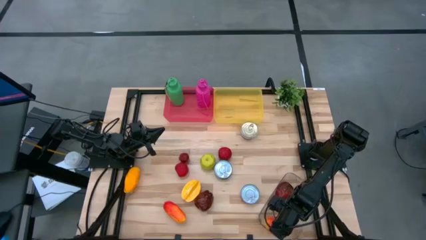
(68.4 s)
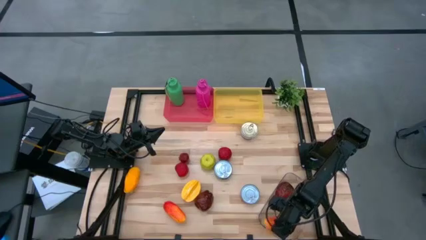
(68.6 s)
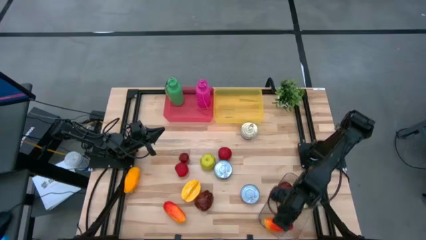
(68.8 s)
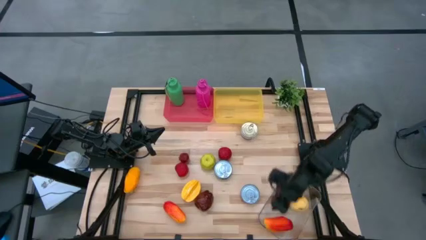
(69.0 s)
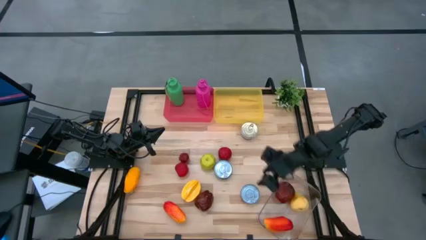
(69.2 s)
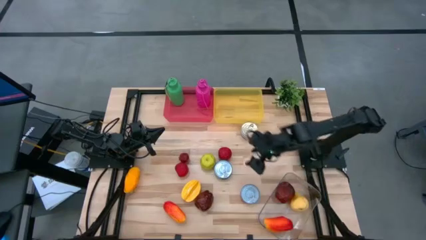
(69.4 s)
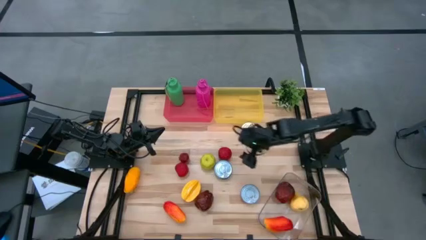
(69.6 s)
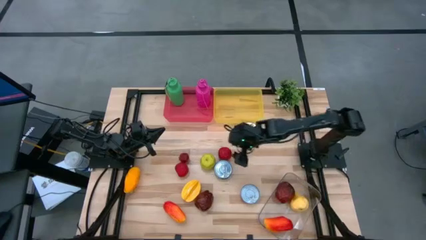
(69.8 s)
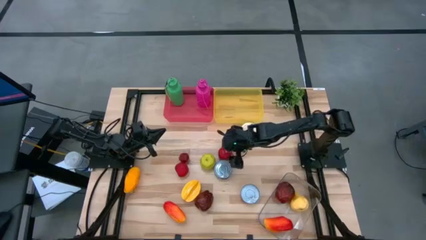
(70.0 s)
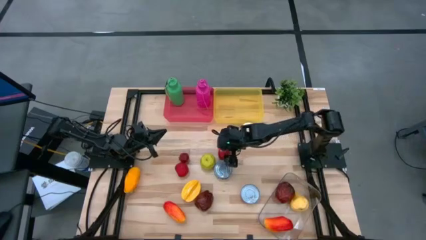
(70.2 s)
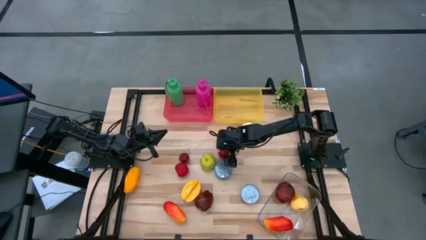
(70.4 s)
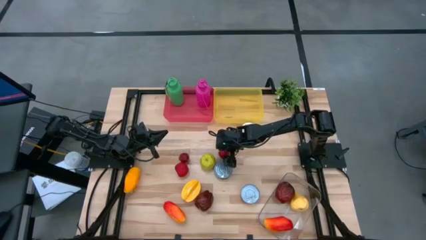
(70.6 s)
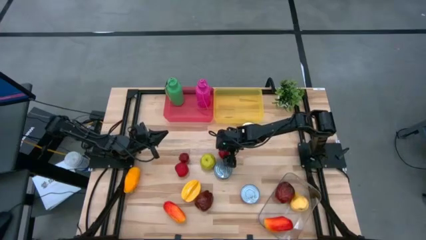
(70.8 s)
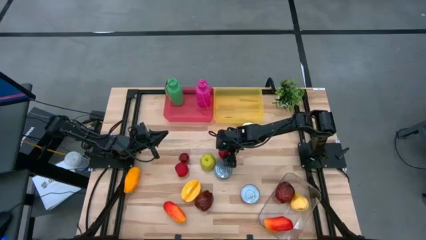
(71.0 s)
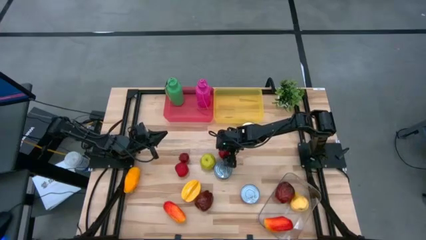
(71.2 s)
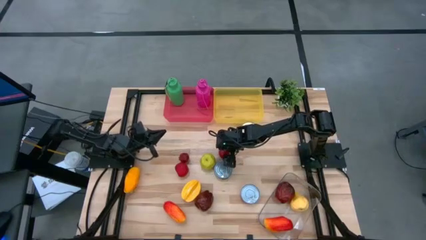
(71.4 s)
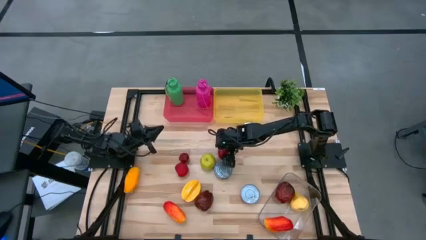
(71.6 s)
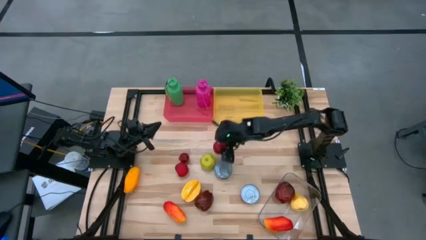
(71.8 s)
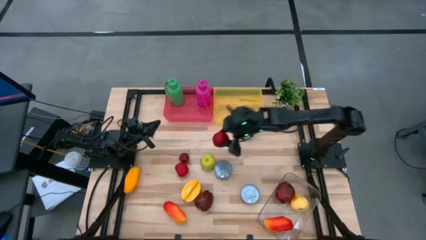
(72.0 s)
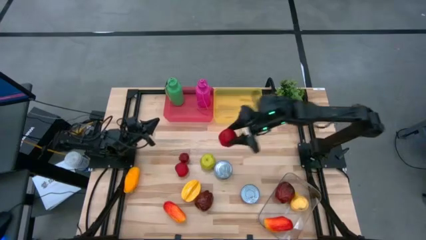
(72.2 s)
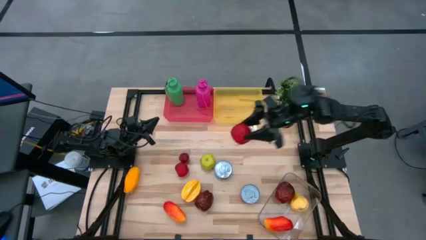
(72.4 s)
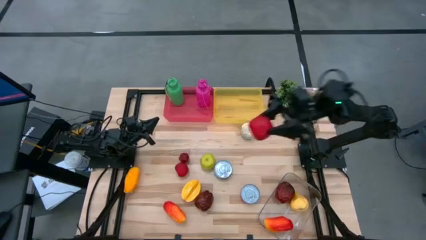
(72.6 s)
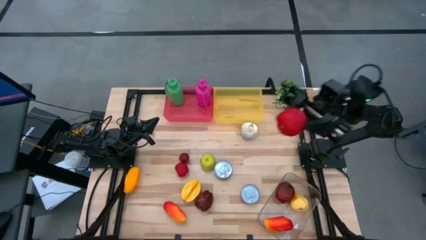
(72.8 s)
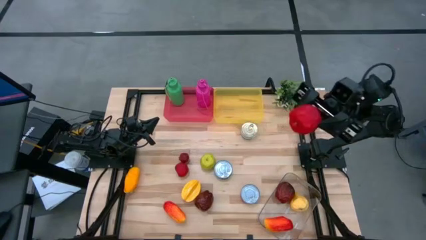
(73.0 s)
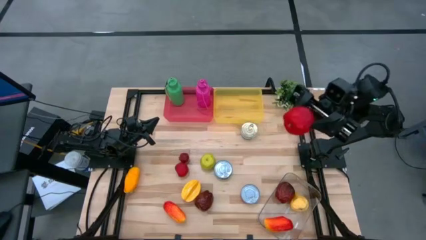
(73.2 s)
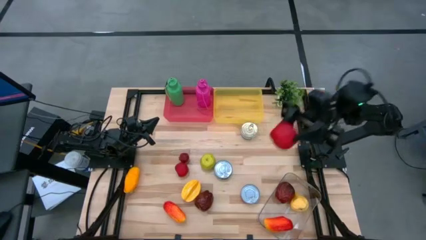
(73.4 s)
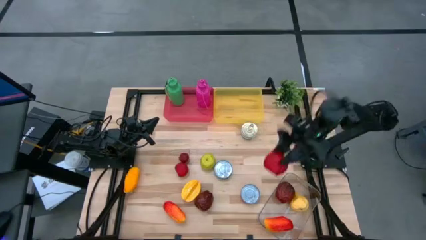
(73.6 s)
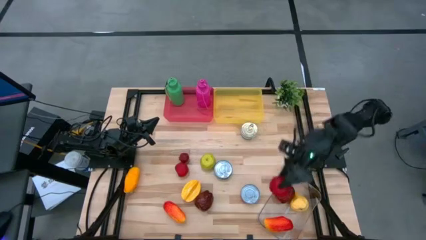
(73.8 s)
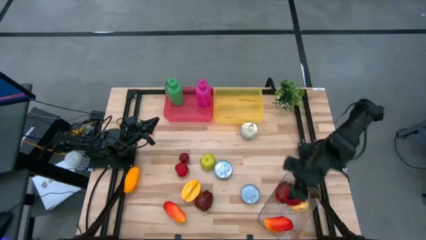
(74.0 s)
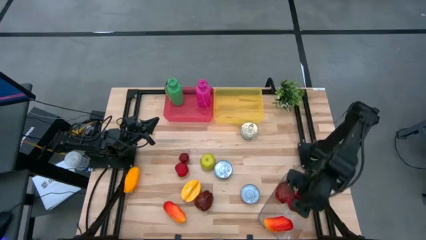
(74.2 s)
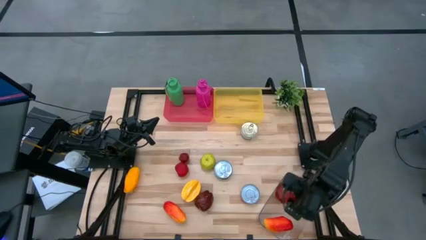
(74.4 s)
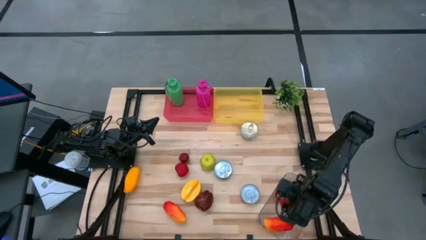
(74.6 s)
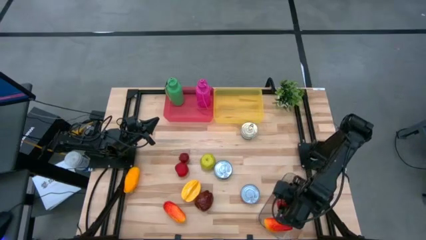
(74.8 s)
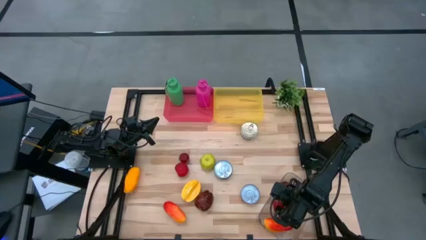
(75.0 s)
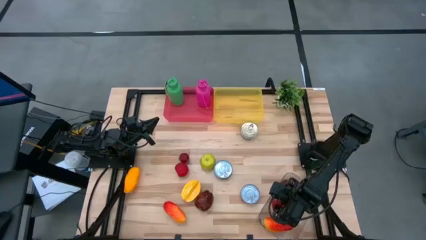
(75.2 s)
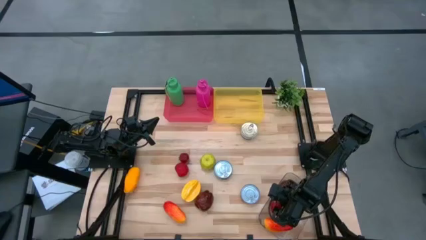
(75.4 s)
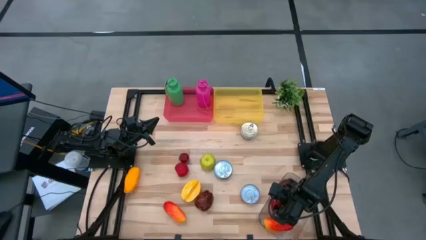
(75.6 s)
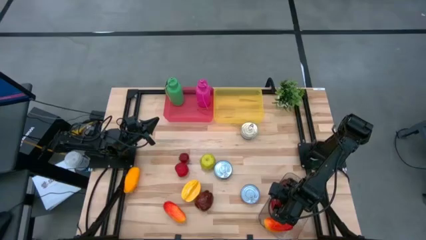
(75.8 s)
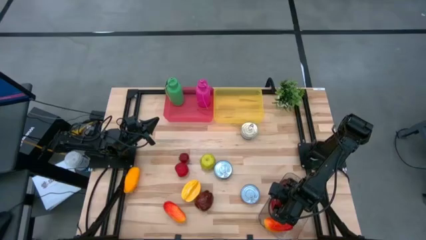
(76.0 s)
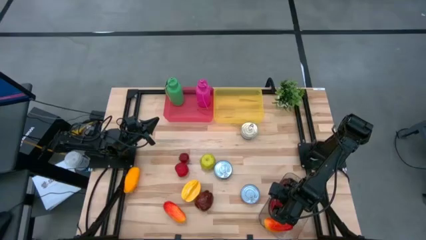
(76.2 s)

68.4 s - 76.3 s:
Task: Pick & Place Food Item
Put the top apple into the transparent bin

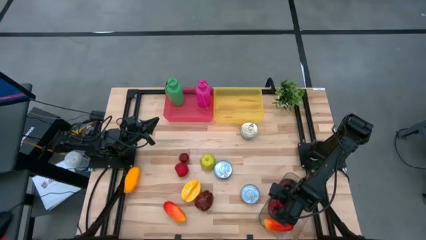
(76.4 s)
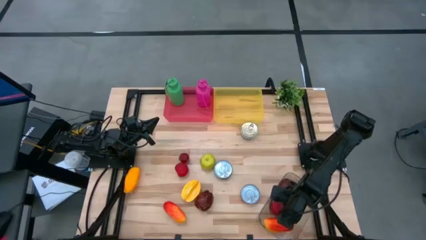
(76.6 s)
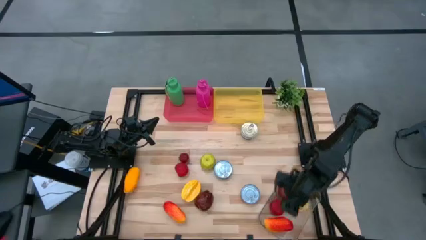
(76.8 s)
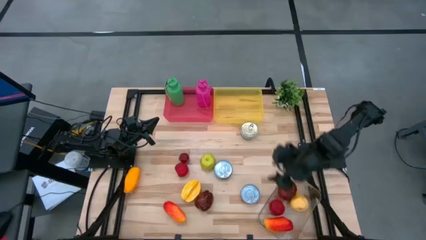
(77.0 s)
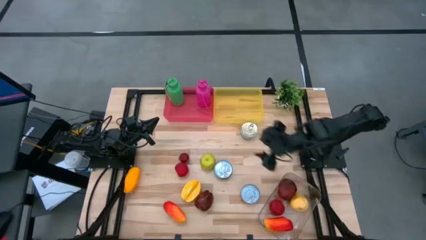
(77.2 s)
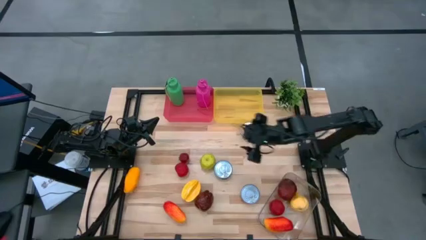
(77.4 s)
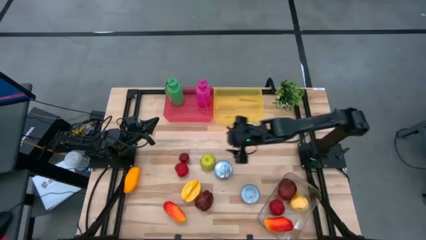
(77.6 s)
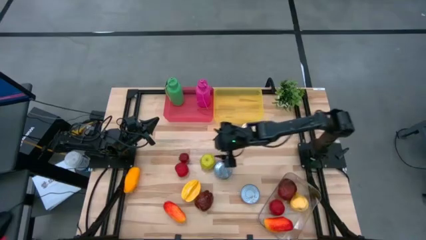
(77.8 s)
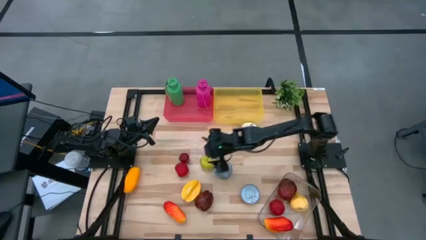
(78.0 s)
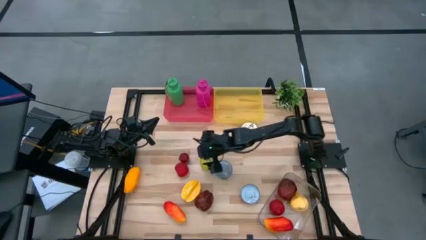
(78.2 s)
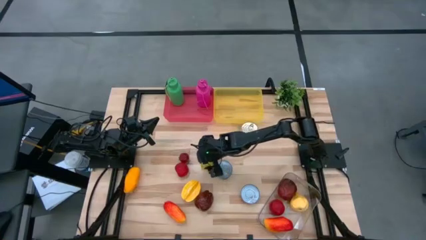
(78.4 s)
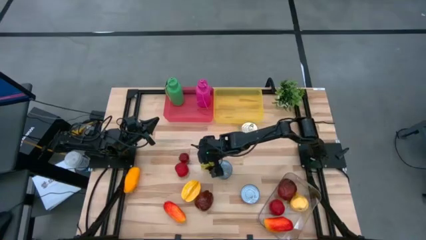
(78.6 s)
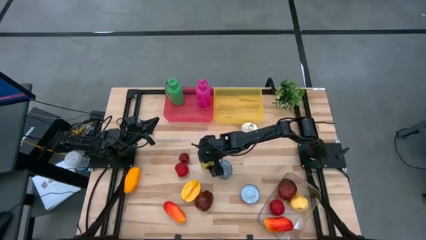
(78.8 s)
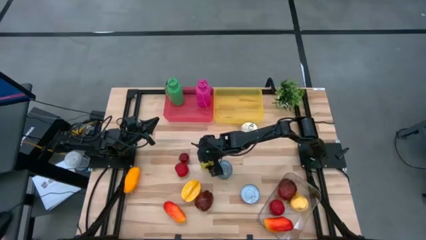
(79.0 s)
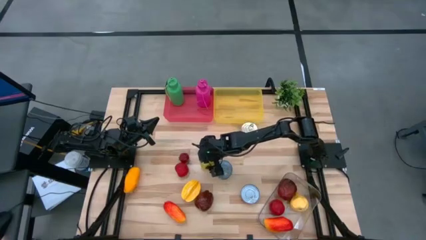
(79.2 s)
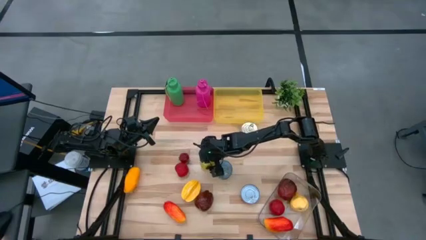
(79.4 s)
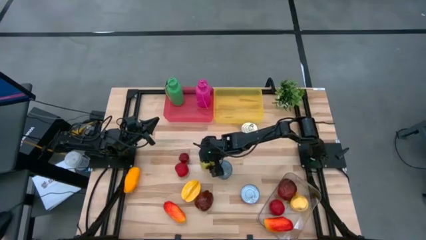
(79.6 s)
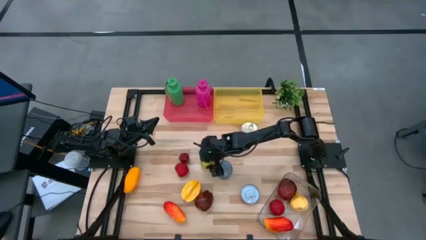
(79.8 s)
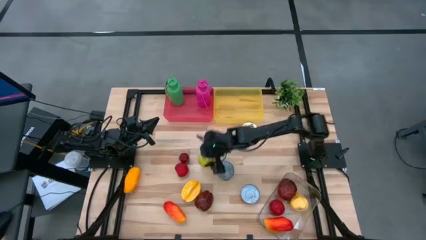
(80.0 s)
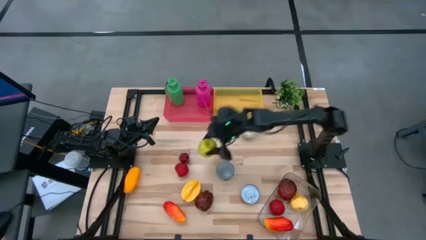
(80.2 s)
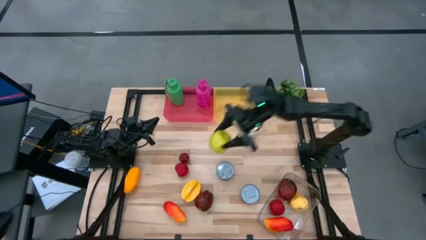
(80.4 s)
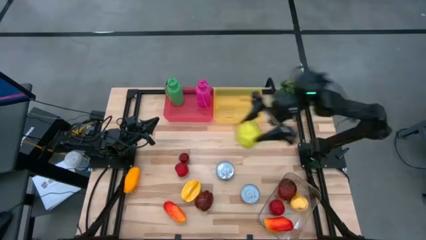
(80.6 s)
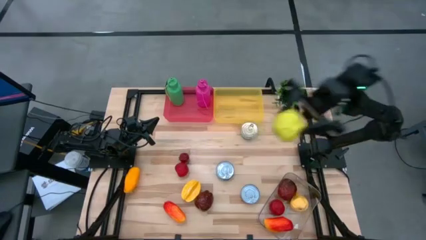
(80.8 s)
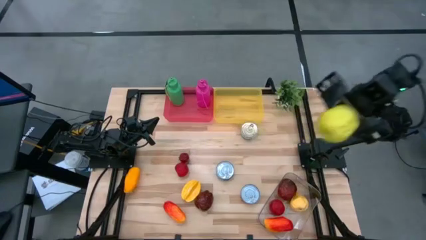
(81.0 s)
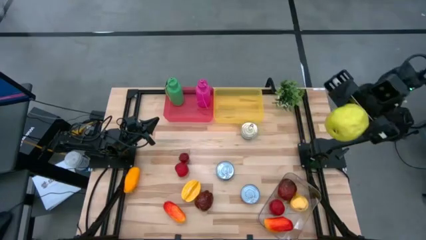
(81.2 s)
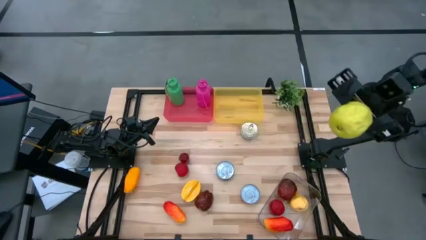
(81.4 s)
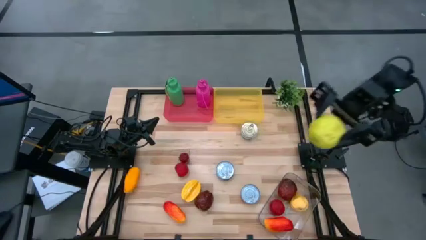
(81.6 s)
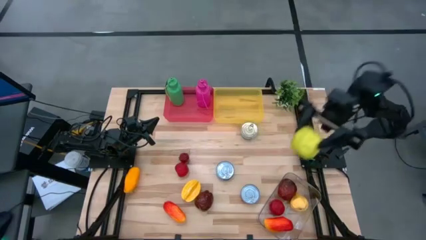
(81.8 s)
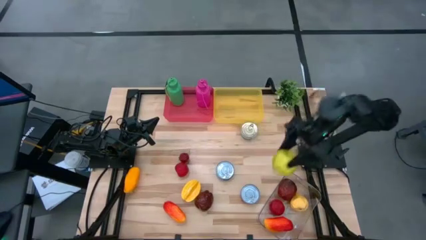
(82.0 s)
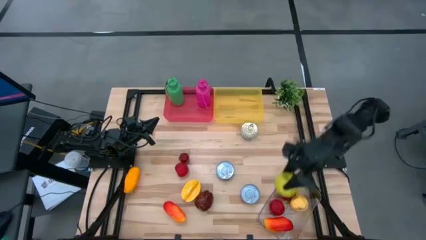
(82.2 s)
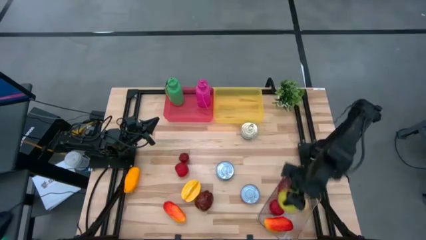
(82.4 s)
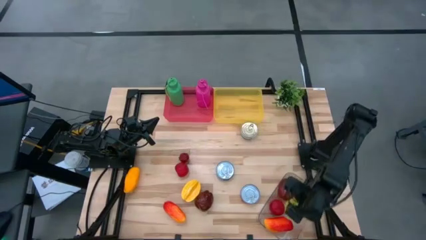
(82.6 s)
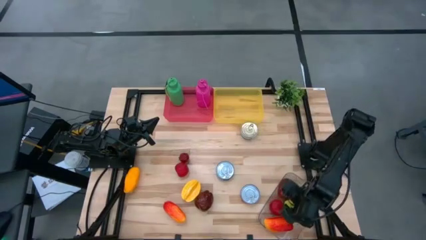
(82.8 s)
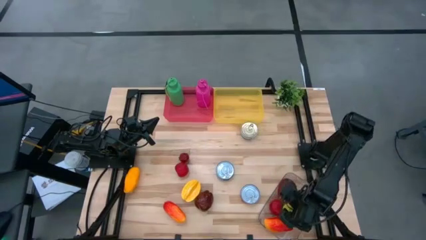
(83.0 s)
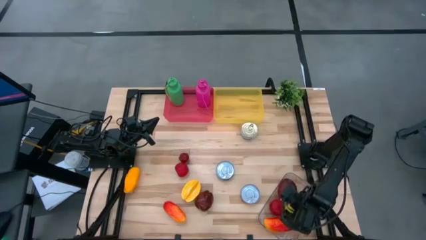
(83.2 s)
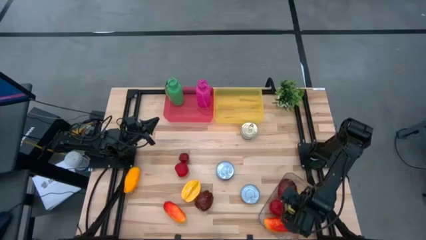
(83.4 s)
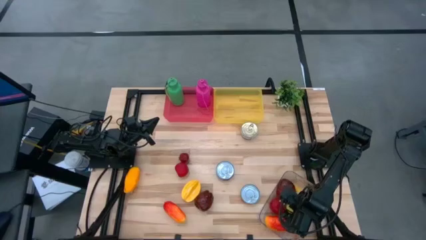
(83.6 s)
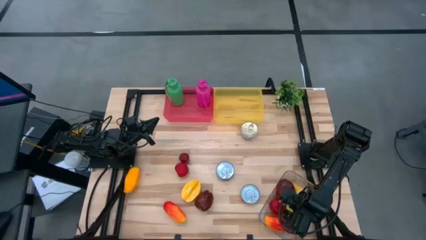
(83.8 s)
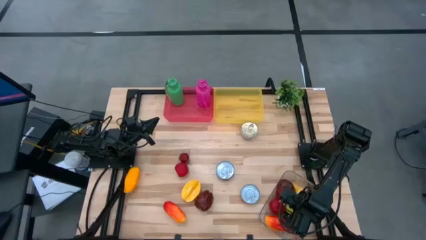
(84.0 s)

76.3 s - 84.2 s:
Put the green apple into the transparent bin
